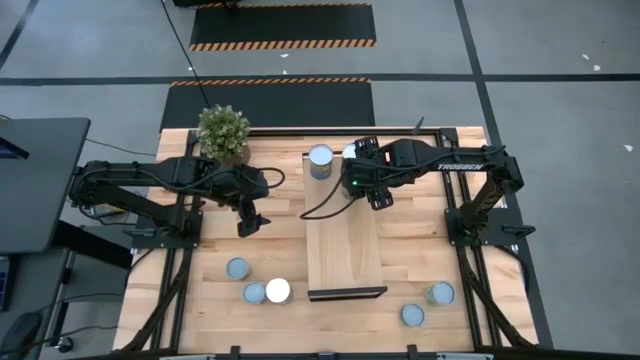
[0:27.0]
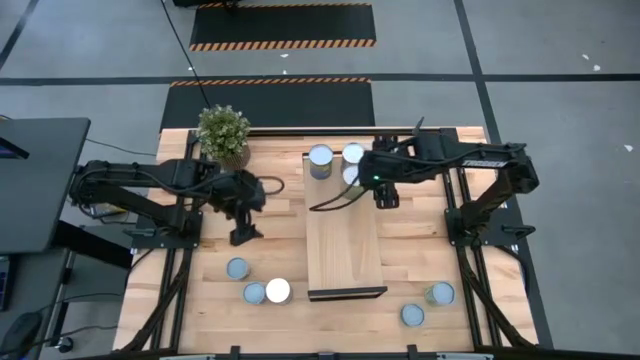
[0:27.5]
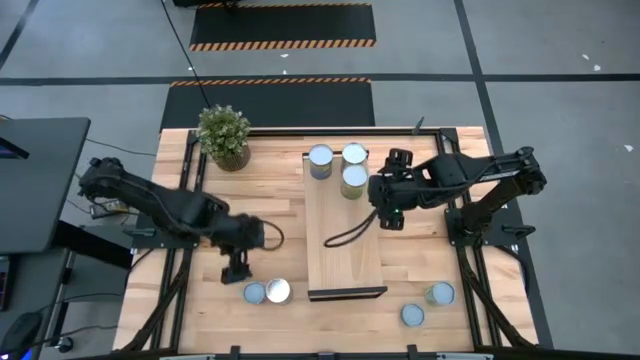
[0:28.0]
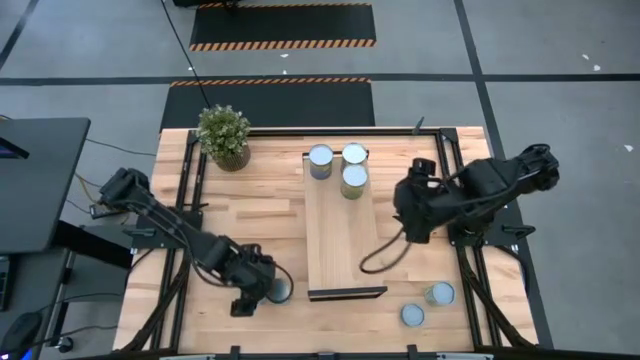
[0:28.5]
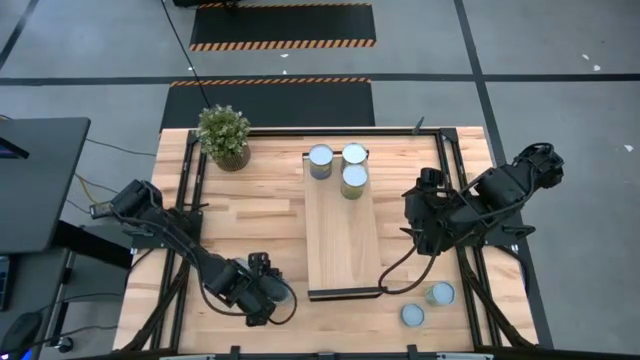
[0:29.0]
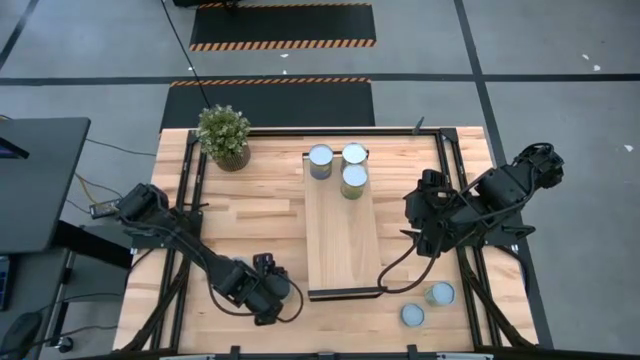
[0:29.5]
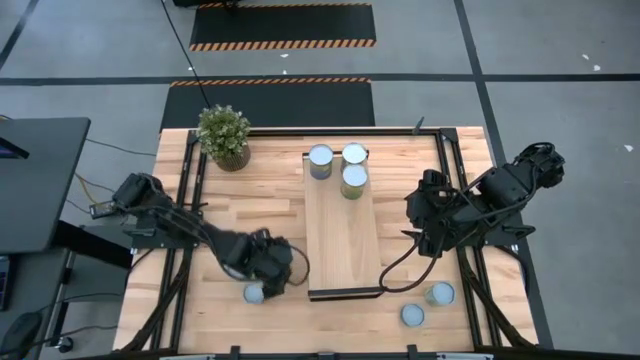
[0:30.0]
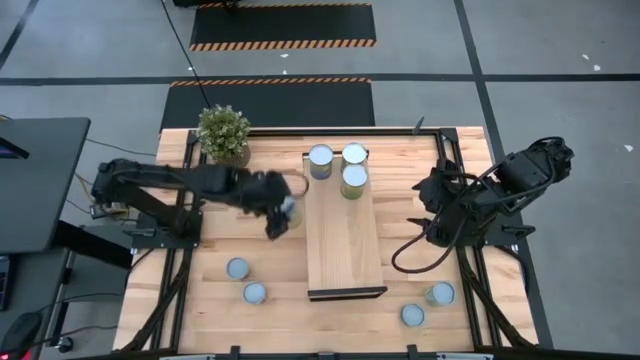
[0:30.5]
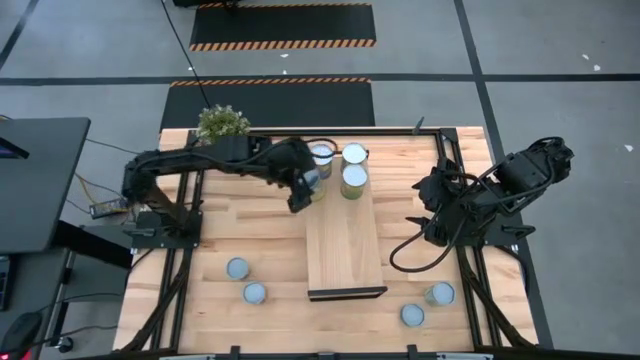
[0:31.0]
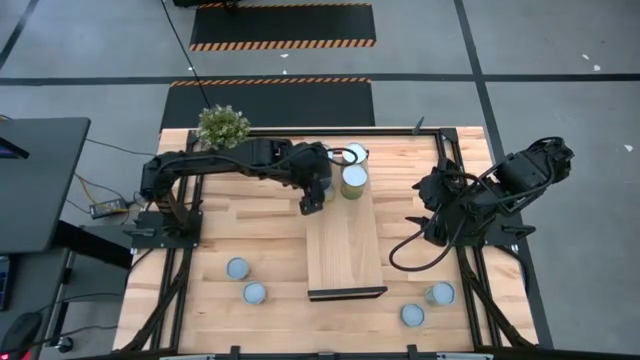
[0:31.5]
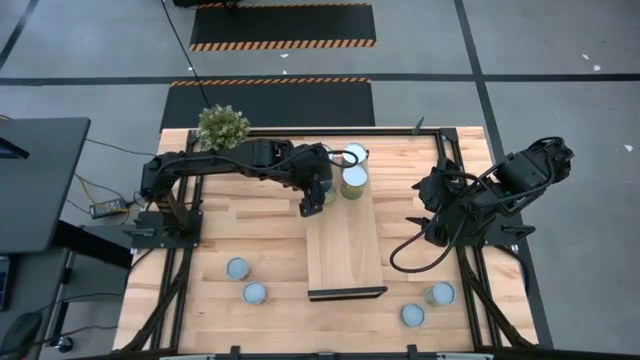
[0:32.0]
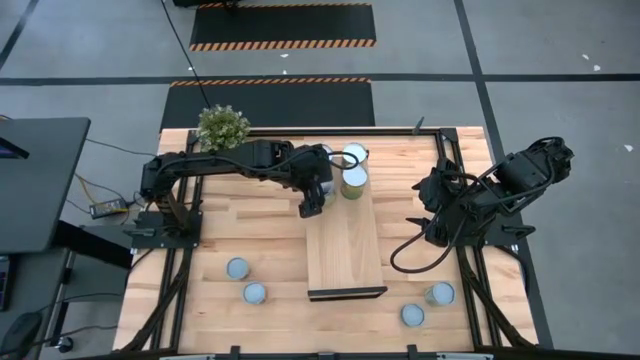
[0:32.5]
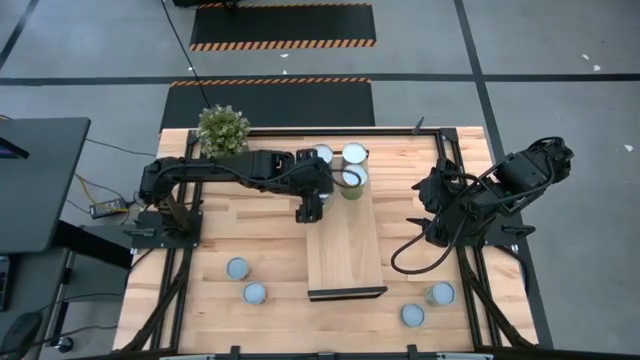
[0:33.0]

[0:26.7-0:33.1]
Task: Pick and place cans onto a shelf
Put the canned carrots on the shelf

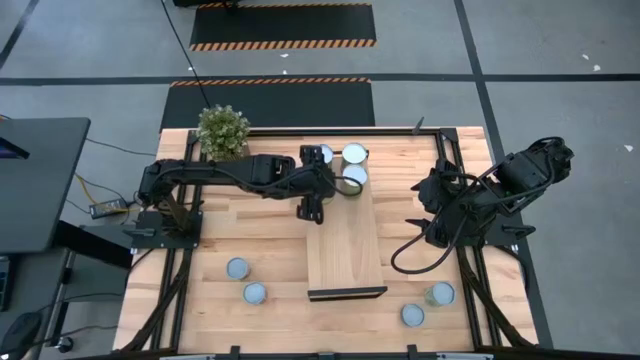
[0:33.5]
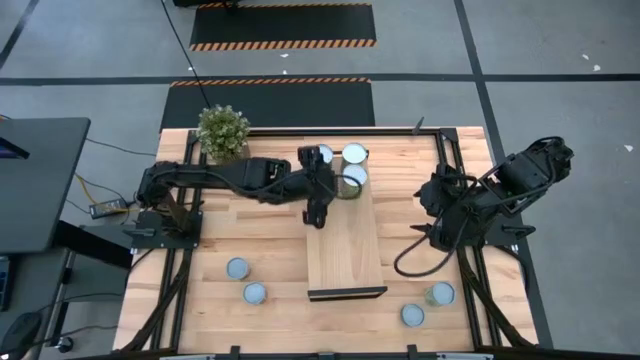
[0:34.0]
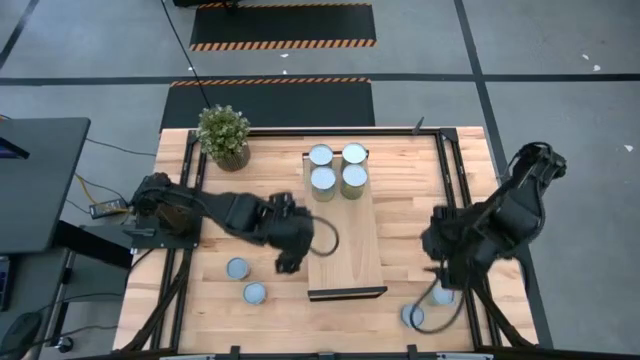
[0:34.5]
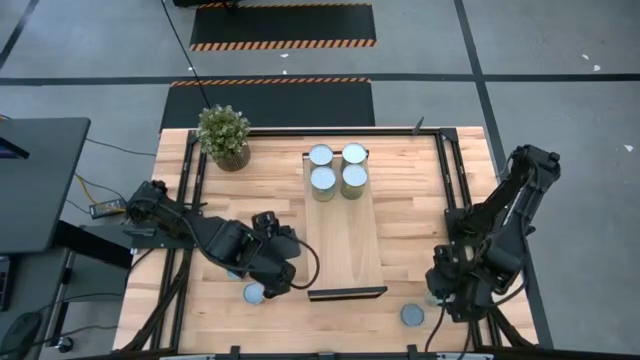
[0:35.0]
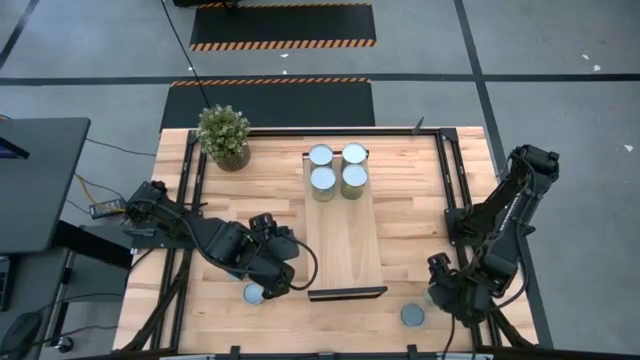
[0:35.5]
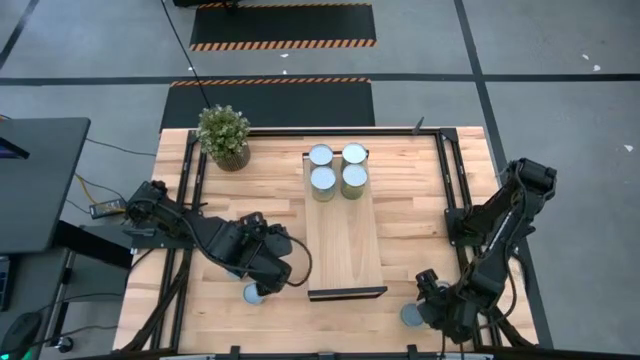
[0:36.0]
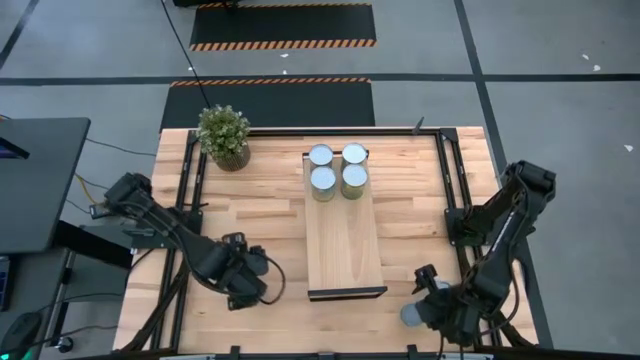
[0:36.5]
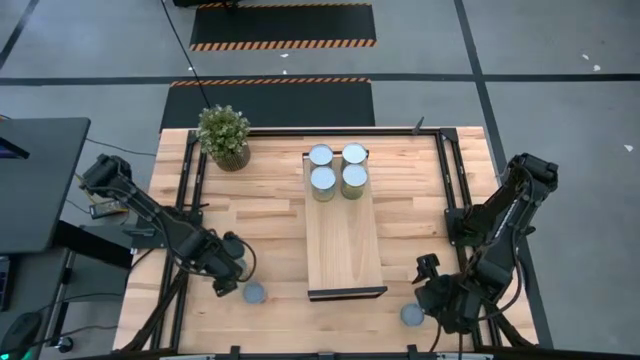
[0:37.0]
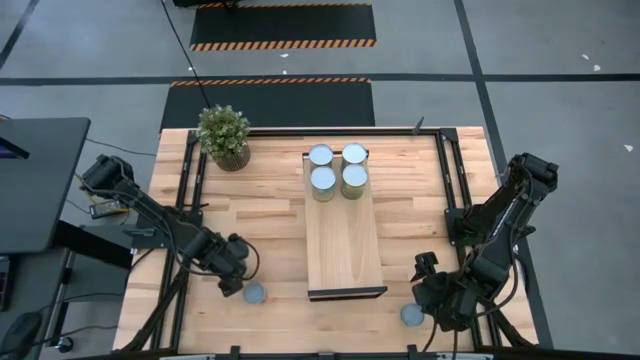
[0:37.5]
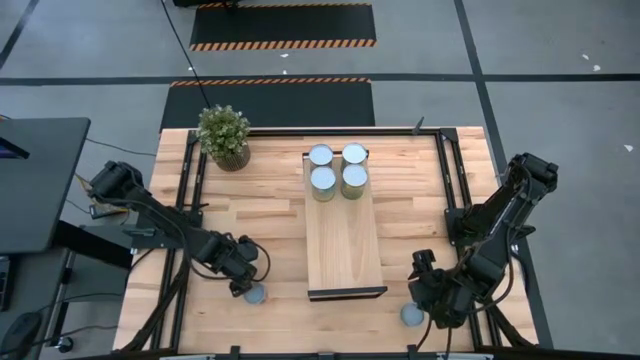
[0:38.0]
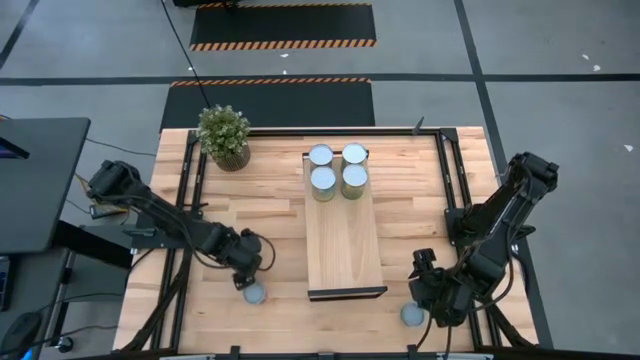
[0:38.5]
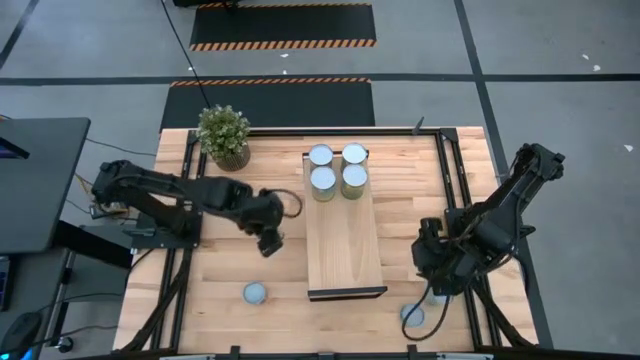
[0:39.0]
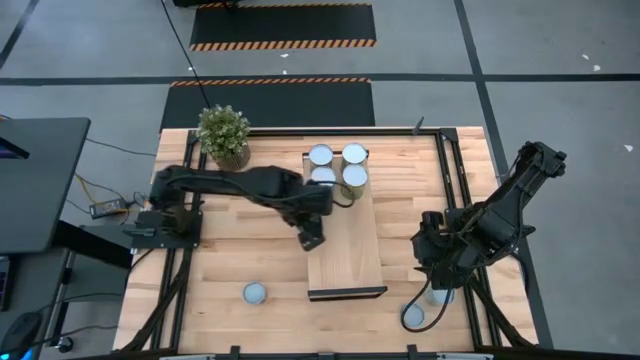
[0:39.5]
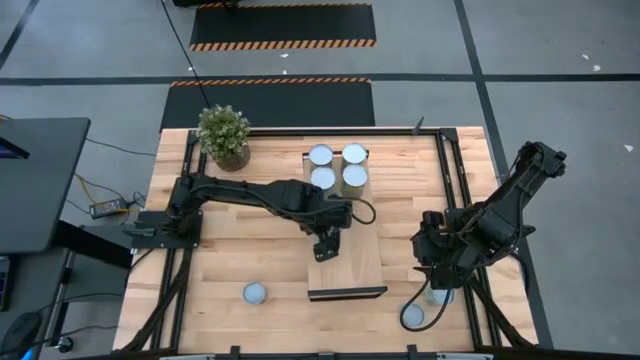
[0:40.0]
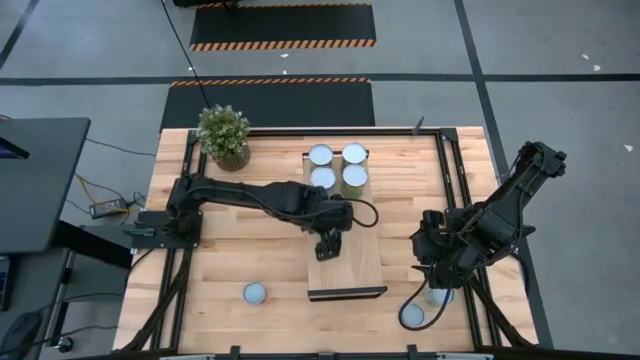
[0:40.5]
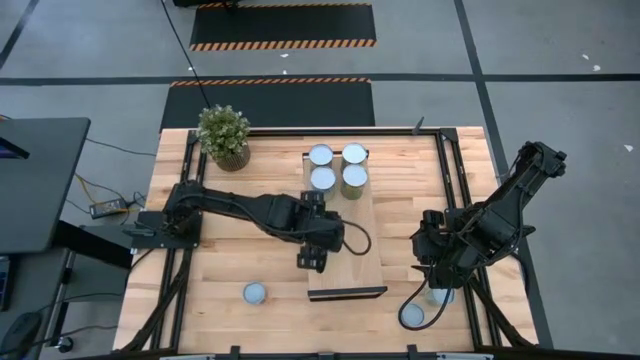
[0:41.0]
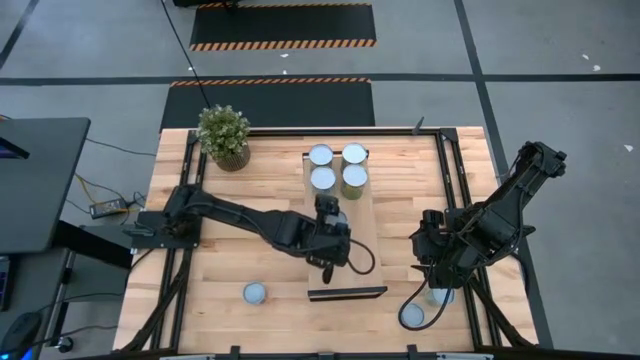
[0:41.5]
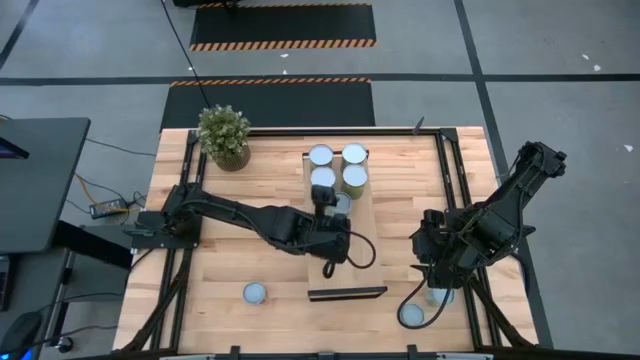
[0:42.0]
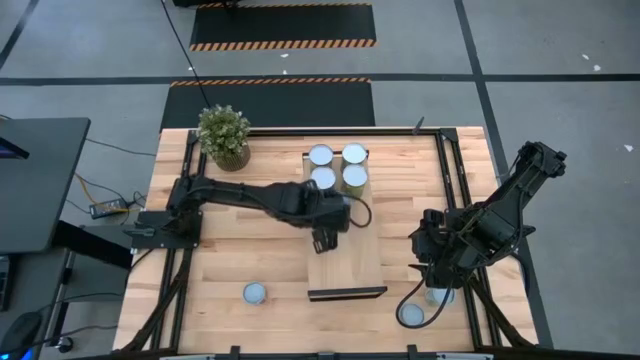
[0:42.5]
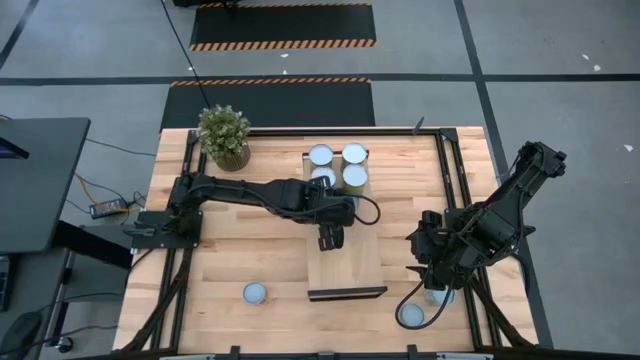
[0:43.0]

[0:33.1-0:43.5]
Put the small canned peas on the shelf

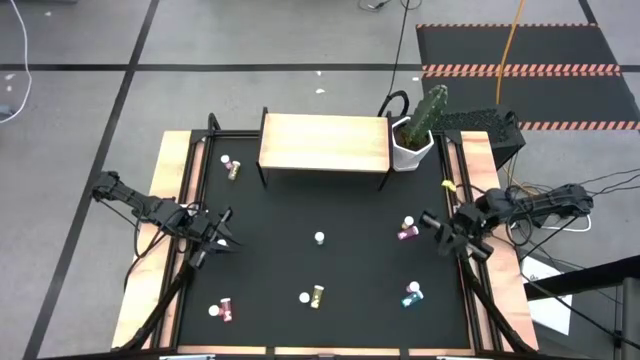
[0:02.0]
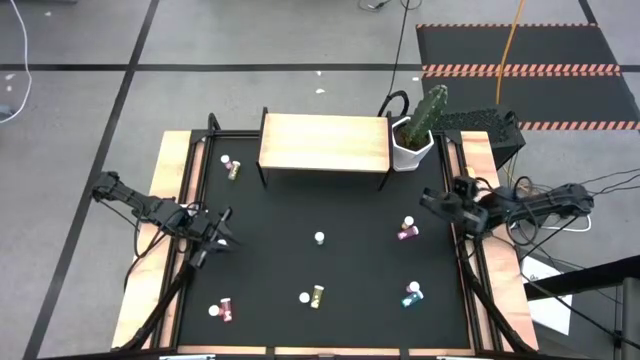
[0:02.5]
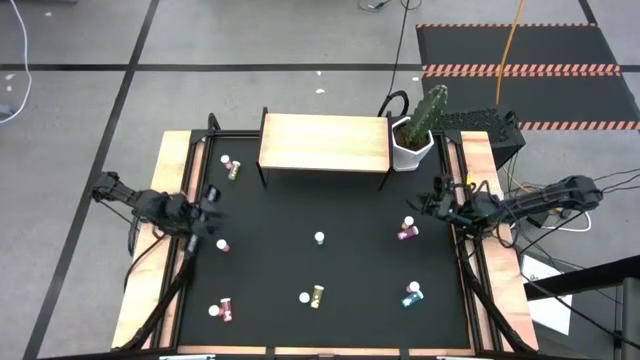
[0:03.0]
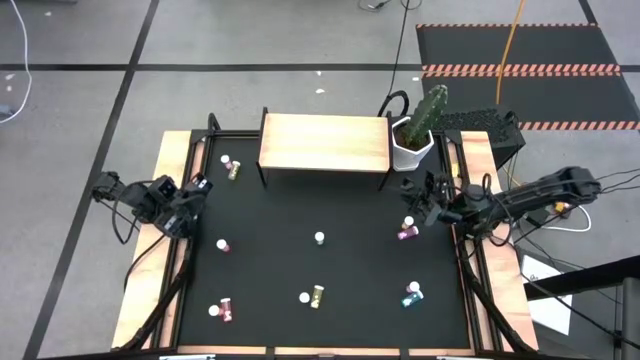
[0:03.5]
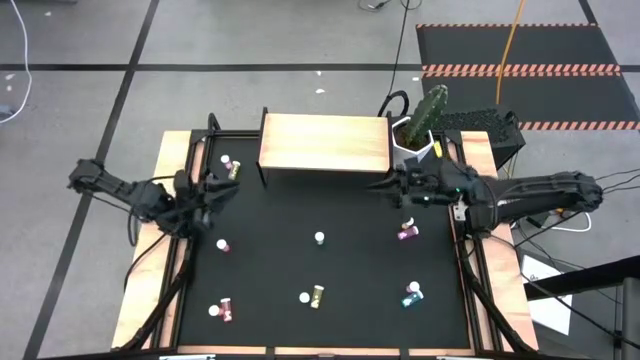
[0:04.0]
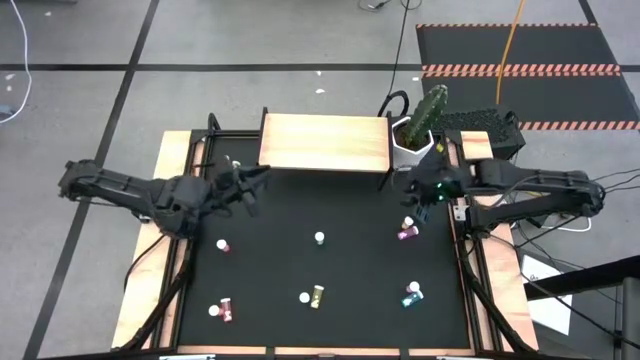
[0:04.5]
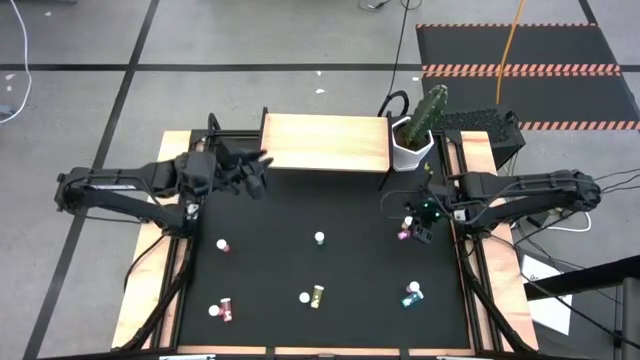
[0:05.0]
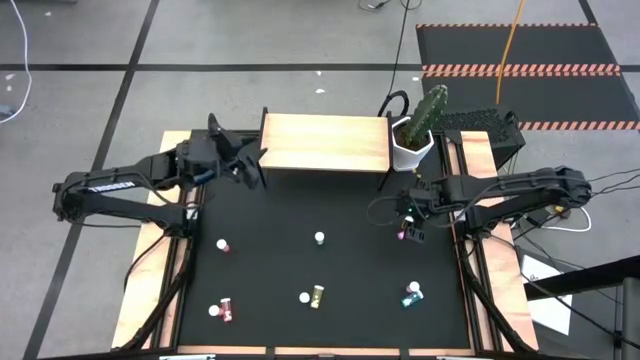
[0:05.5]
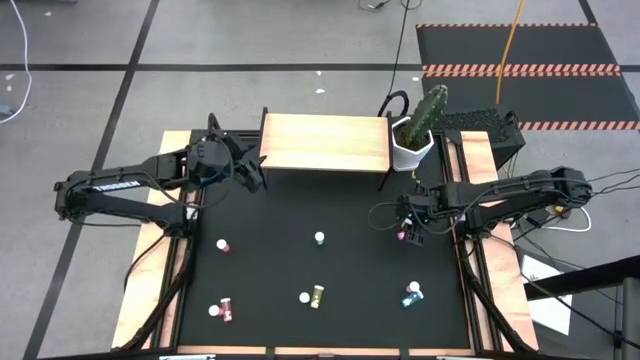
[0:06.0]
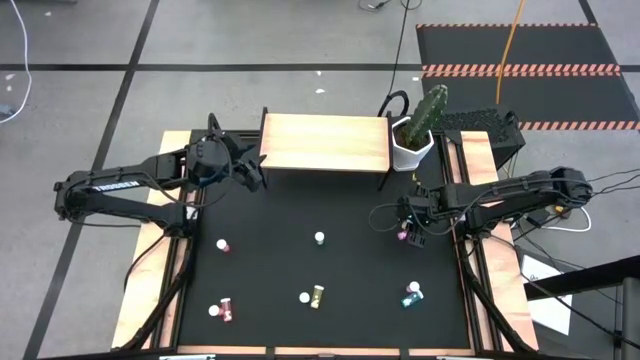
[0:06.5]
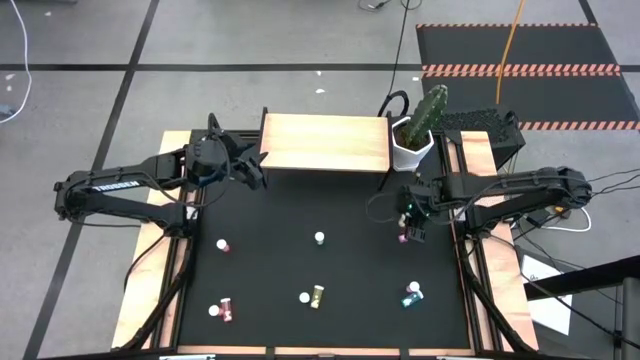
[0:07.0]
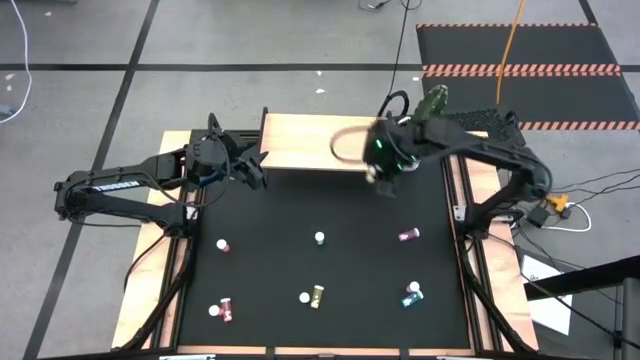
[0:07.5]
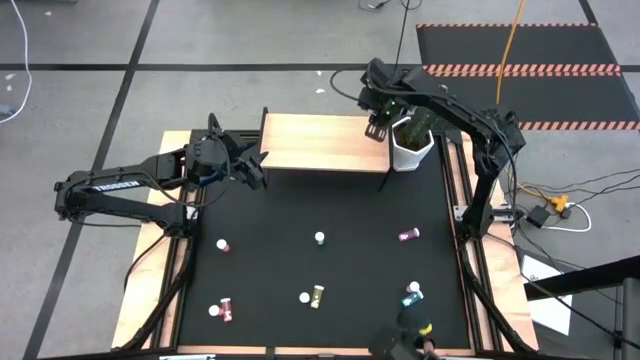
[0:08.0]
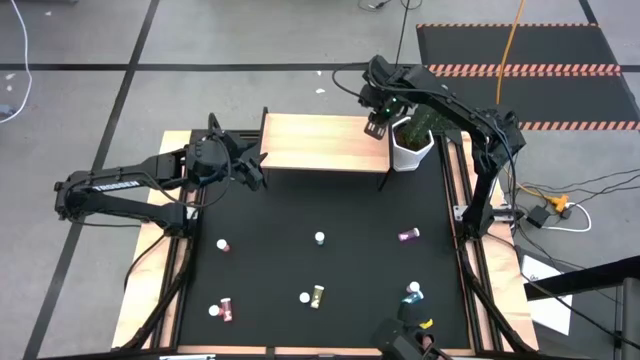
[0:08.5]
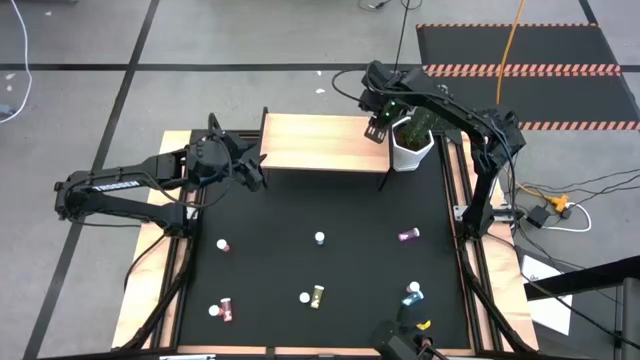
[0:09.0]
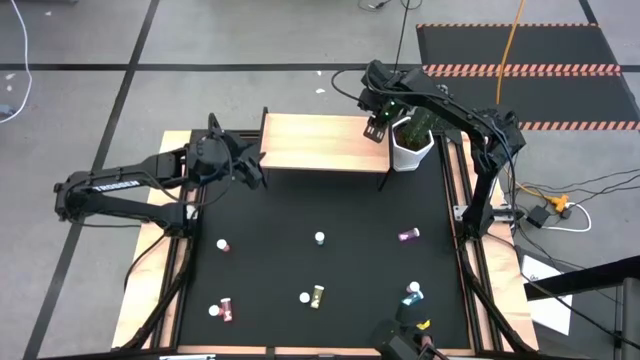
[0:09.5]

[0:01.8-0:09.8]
Task: Pick and place medicine bottles onto shelf by color
Put the middle right yellow pill bottle on the shelf
